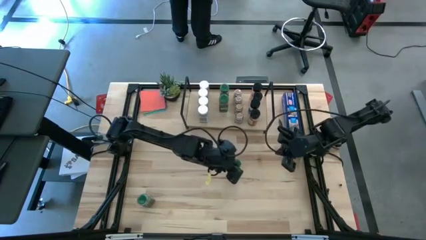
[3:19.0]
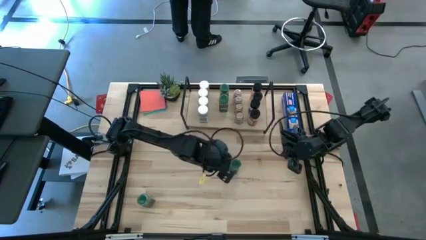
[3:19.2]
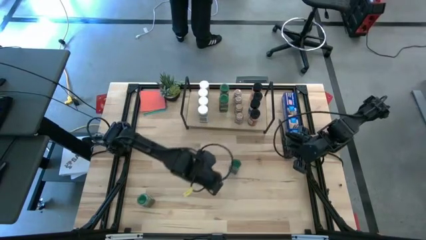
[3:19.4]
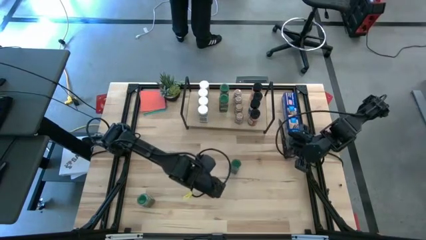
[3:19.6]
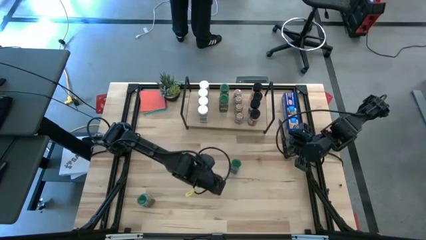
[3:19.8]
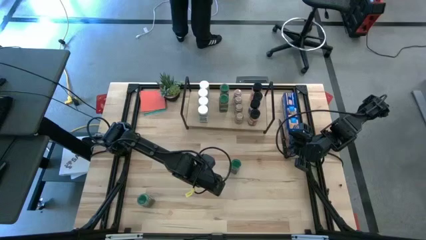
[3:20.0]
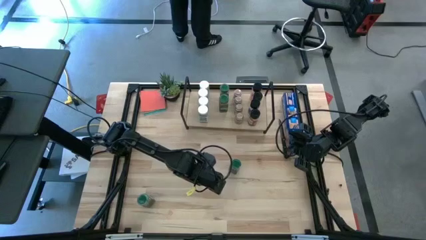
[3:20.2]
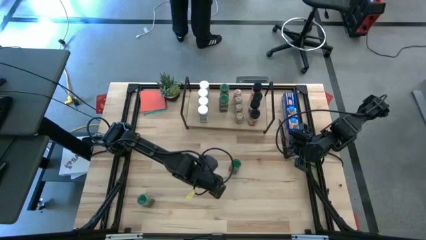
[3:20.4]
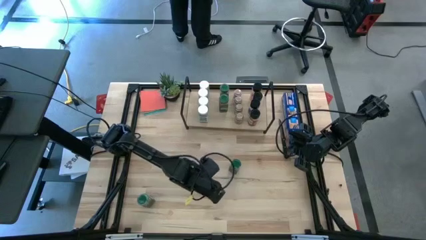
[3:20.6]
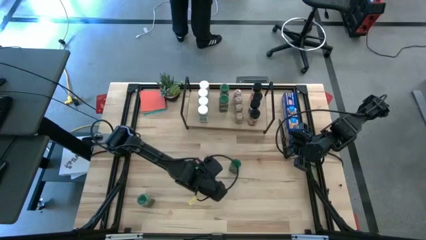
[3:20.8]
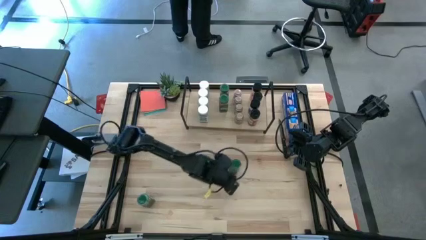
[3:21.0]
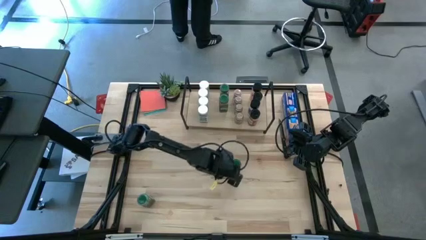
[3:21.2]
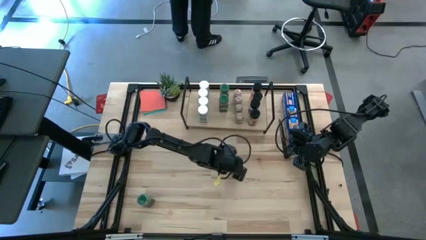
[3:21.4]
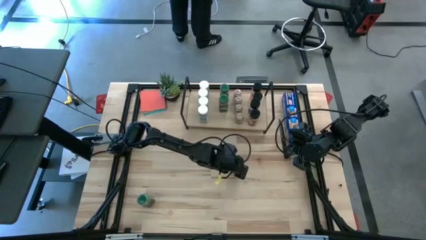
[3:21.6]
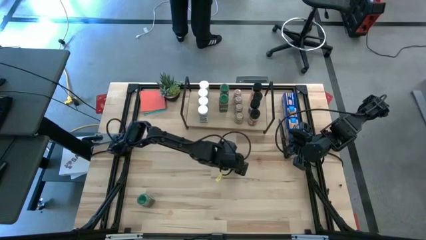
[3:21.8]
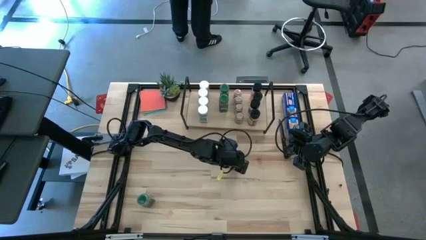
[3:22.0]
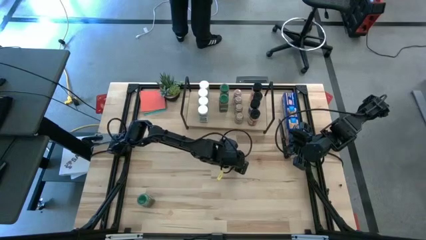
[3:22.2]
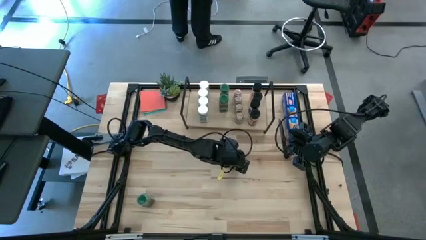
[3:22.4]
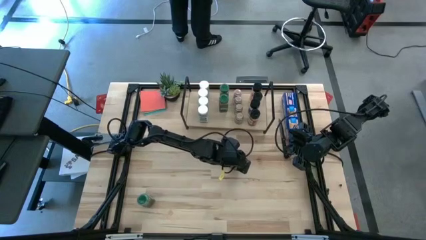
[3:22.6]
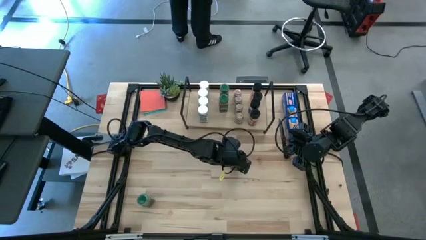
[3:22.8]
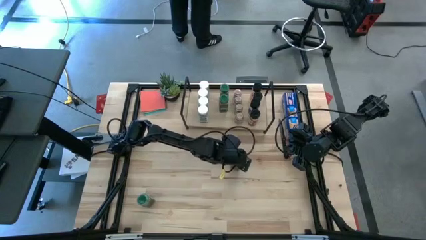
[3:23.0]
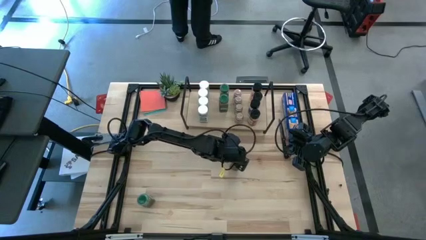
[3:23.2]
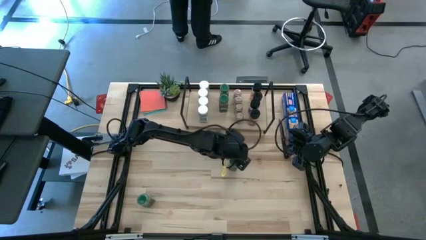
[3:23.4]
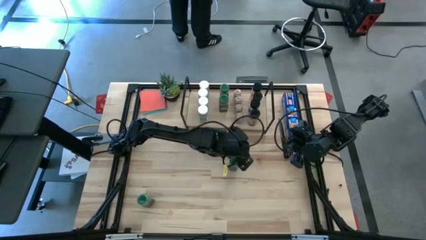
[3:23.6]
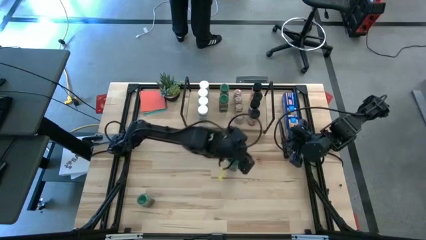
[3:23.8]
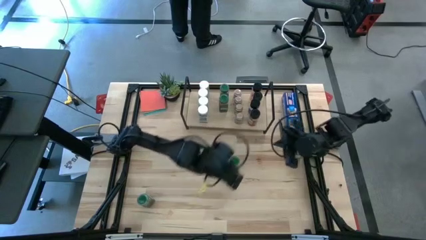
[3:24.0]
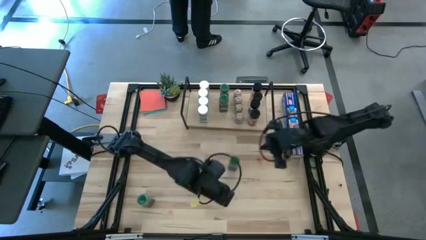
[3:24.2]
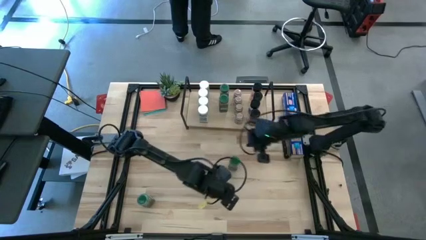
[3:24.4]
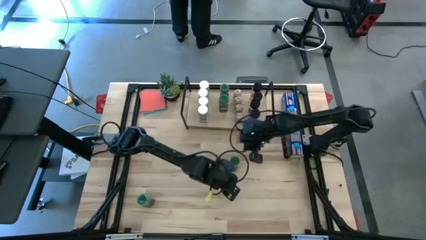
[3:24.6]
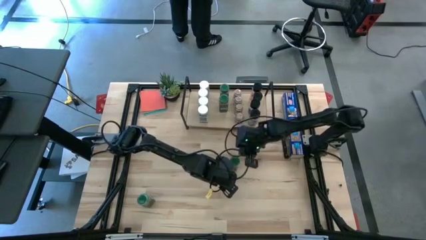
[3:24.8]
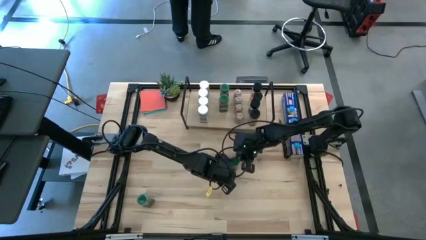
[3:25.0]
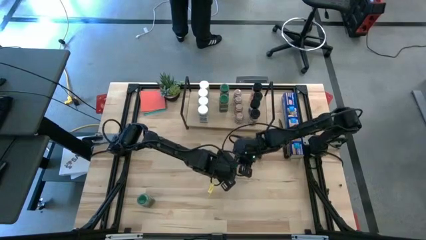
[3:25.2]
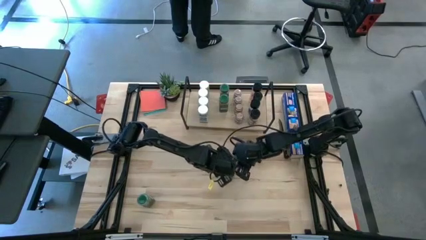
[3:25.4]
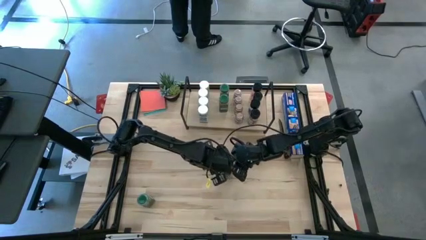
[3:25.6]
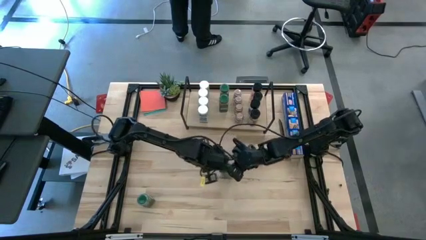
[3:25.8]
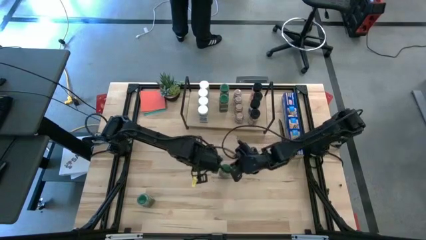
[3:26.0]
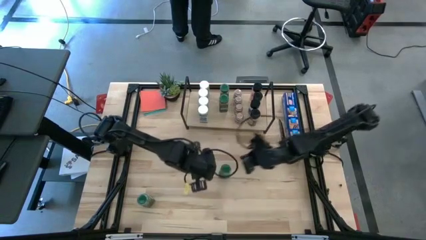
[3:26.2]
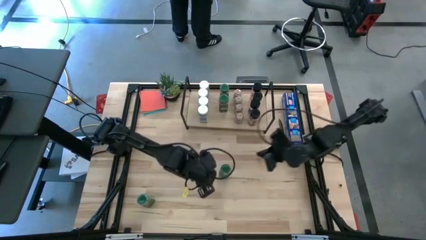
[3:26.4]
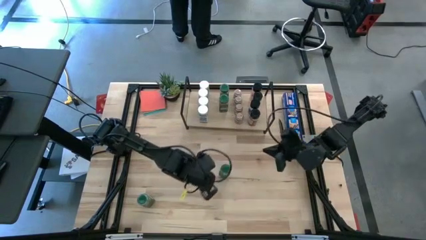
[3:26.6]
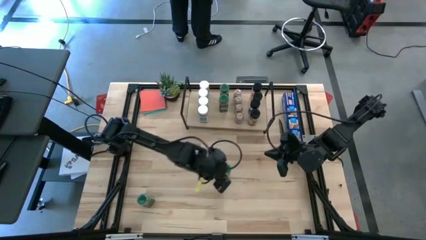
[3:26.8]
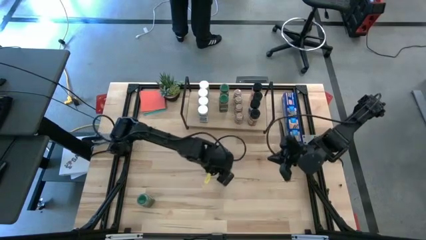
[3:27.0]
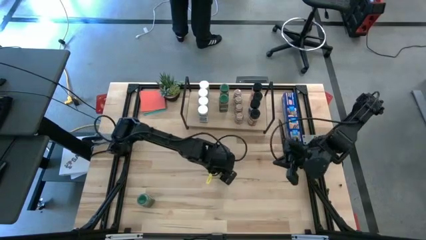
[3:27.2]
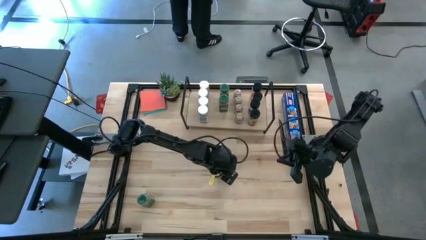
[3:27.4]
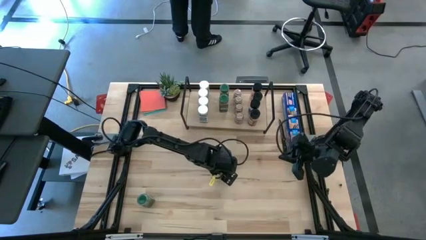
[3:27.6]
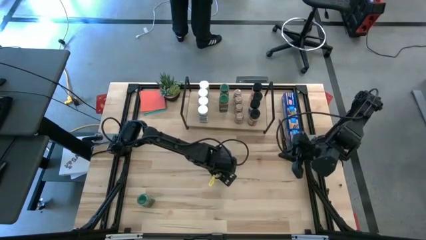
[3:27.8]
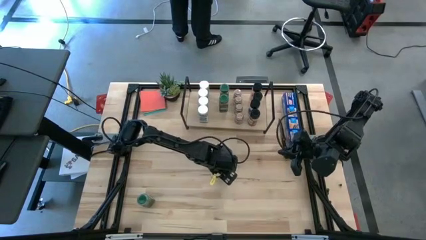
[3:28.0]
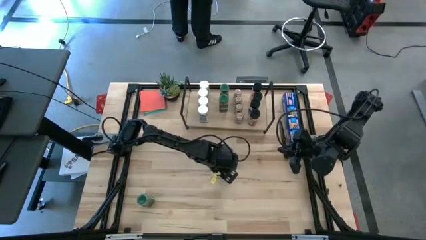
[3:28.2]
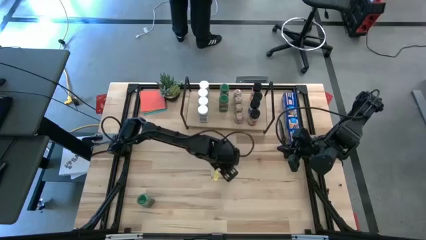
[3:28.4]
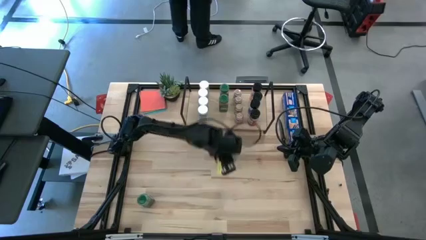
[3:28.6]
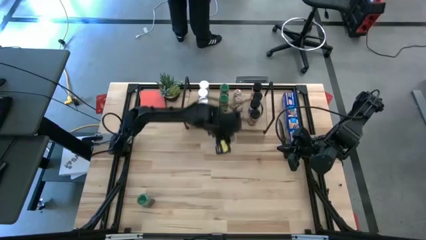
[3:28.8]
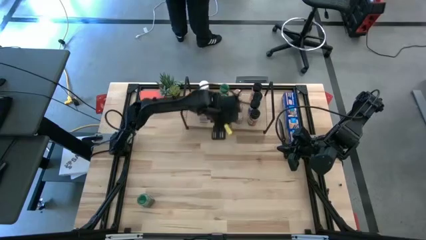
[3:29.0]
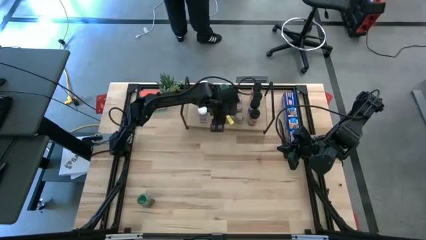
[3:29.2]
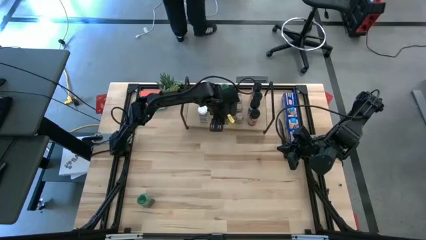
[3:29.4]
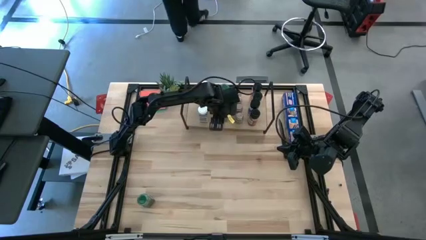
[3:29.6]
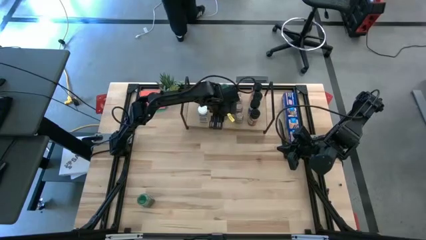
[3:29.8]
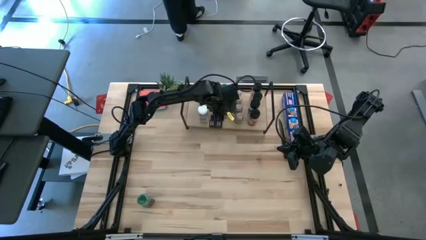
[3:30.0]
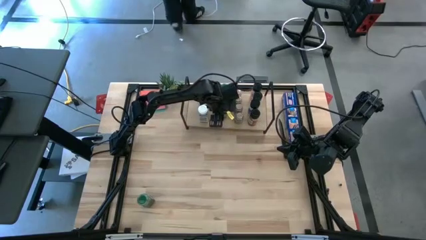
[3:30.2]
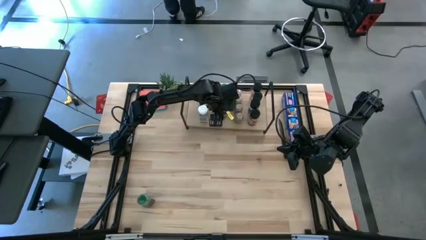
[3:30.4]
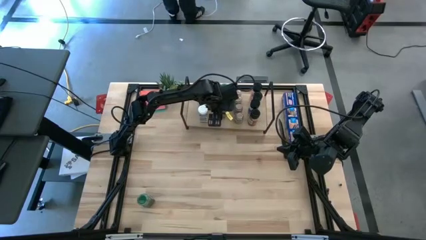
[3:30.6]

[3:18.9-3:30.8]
Task: Shelf spices
Put the green seasoning bottle on the shelf, aligned with the other green bottle

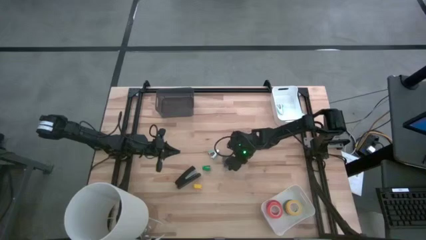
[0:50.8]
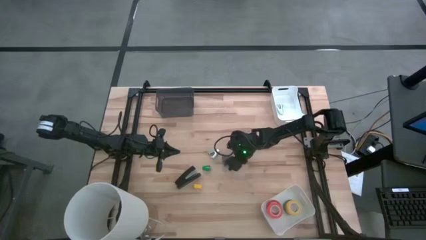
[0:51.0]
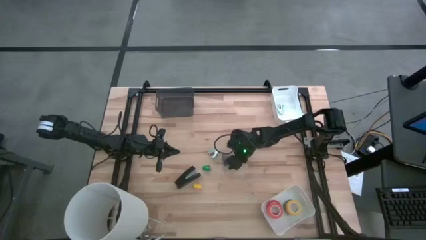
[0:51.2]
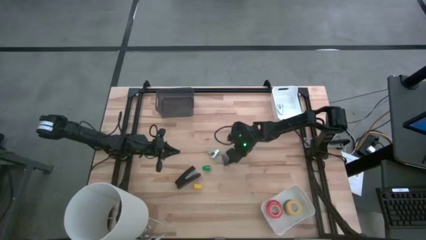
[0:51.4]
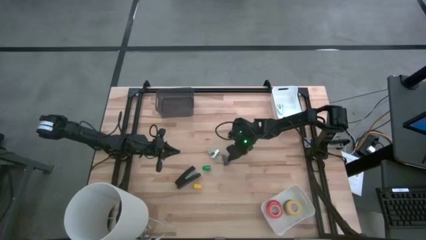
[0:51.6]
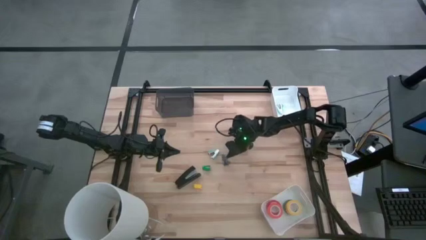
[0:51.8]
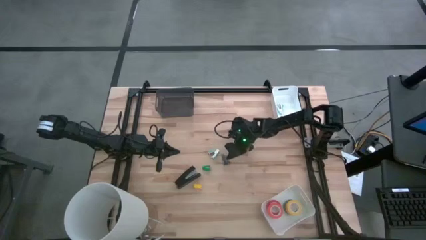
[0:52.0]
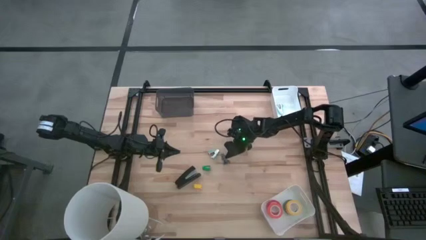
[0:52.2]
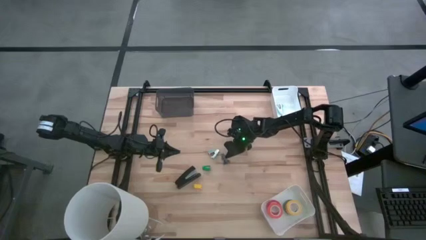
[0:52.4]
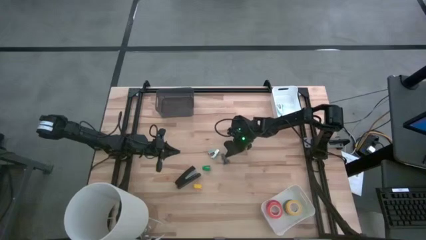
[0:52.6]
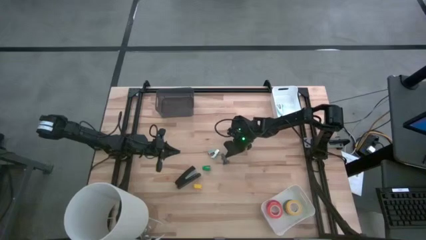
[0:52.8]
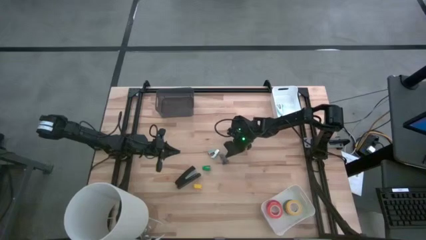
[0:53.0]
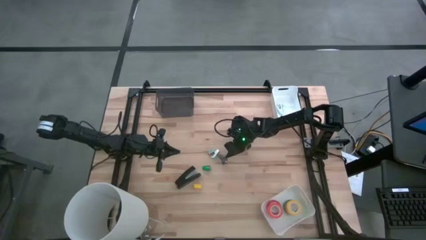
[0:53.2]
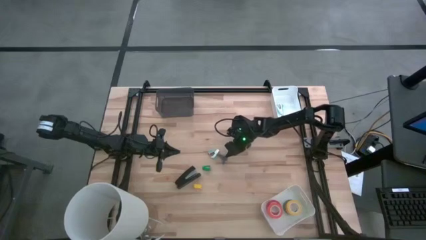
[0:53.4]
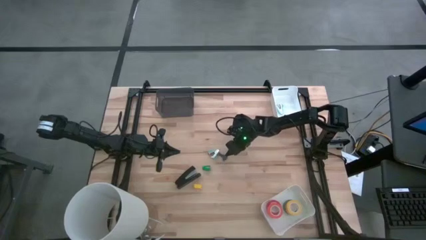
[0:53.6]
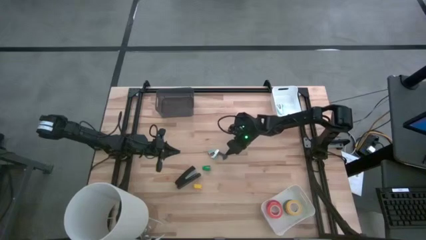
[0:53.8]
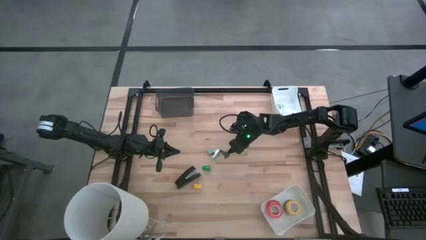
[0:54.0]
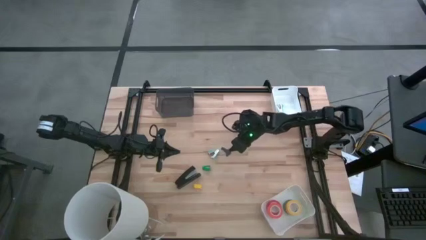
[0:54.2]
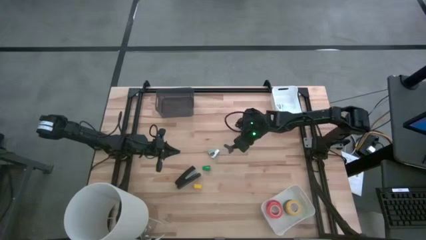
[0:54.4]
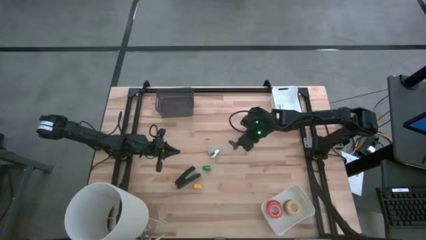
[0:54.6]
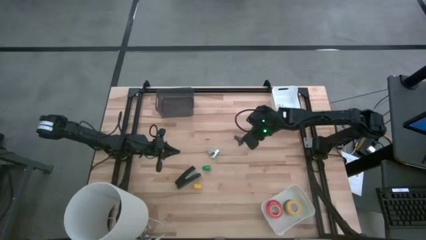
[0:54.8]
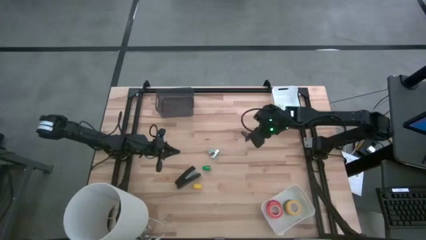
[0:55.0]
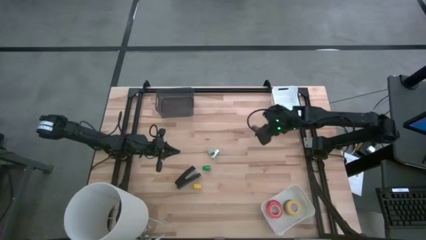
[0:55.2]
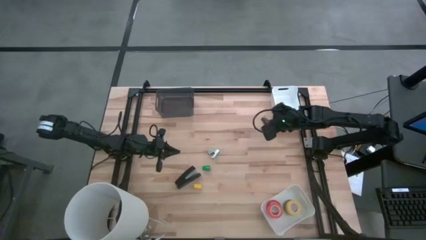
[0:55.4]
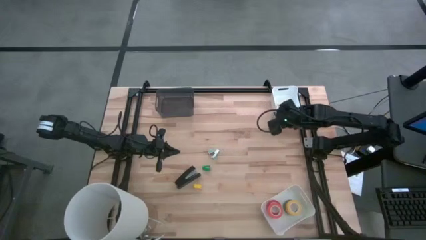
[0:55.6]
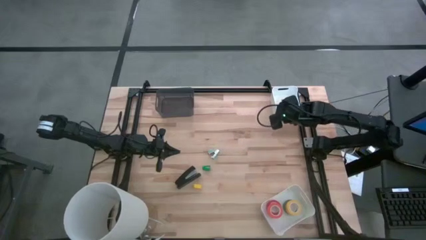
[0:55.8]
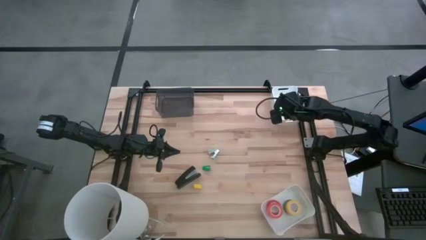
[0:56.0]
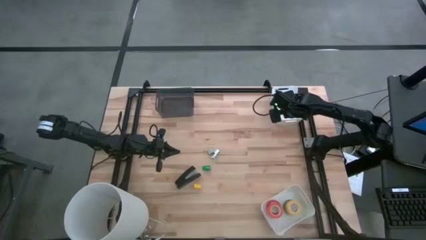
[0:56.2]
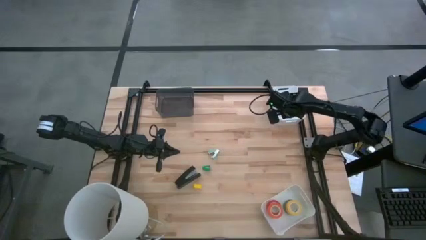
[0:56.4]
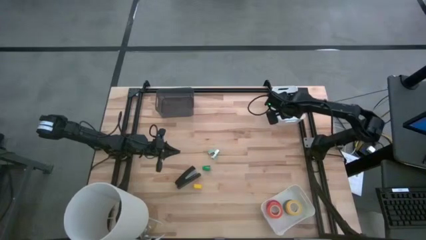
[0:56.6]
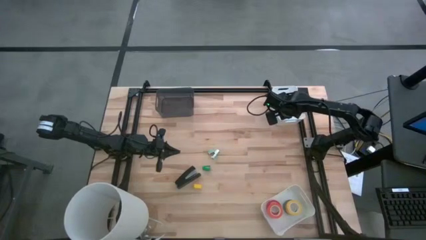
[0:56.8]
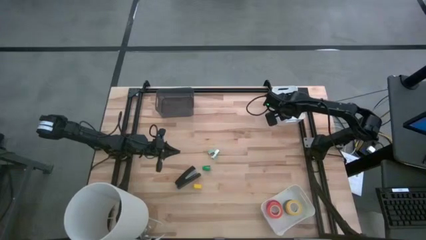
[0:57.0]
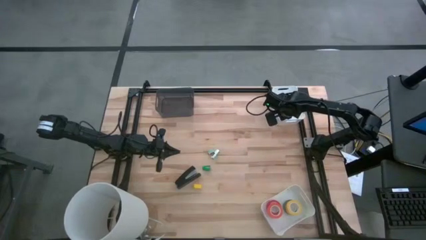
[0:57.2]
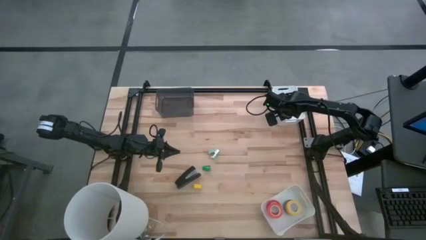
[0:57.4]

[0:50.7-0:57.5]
Task: Pick and place Stapler, Stapler remover, tape
Put the blue staple remover into the top white bin
